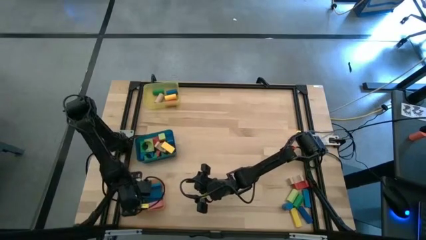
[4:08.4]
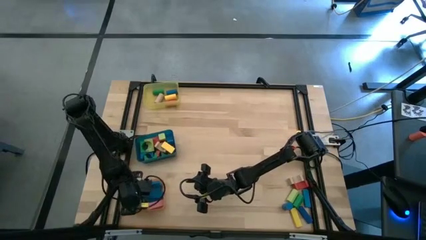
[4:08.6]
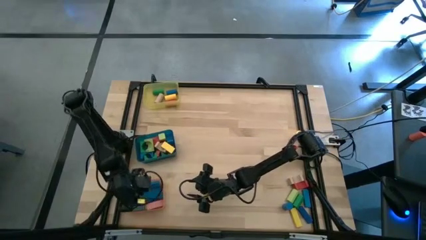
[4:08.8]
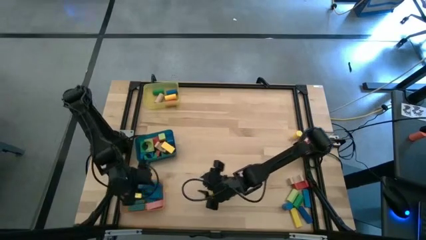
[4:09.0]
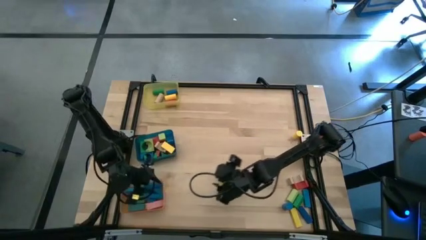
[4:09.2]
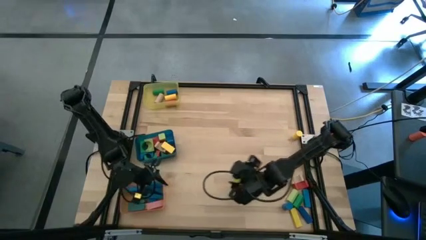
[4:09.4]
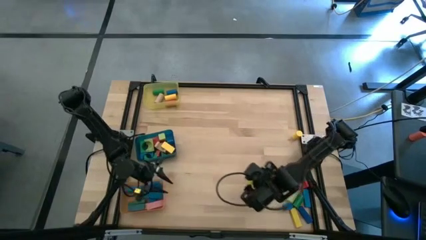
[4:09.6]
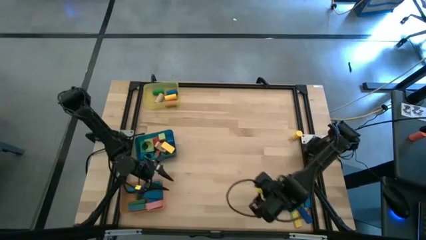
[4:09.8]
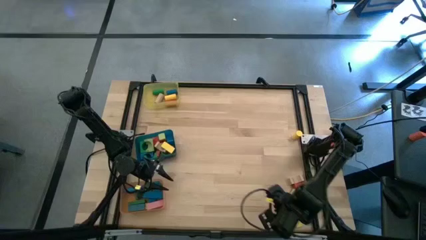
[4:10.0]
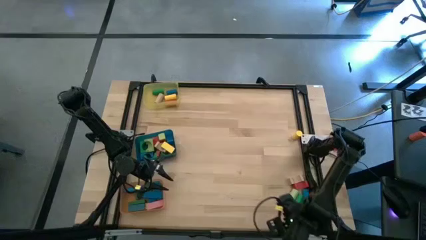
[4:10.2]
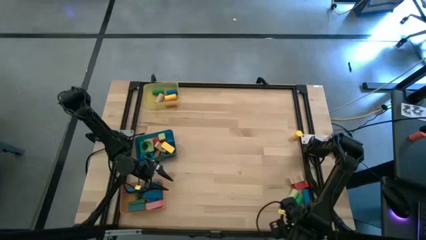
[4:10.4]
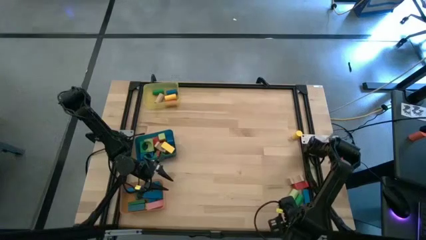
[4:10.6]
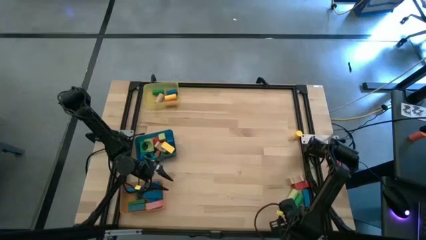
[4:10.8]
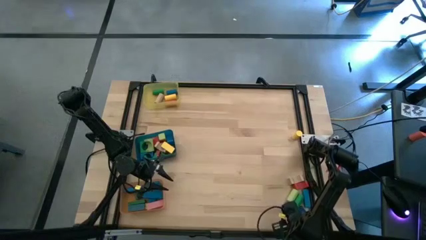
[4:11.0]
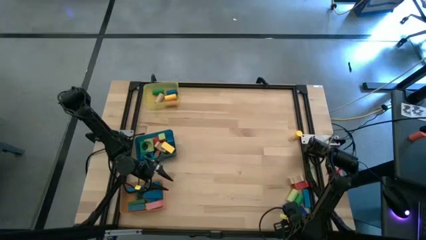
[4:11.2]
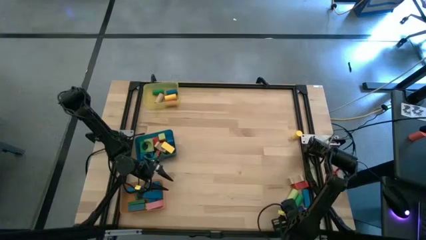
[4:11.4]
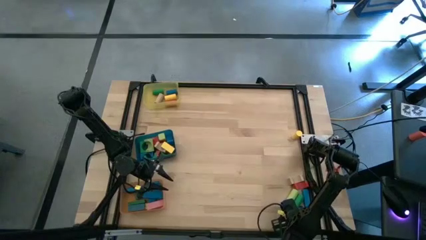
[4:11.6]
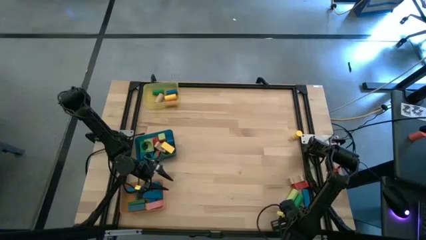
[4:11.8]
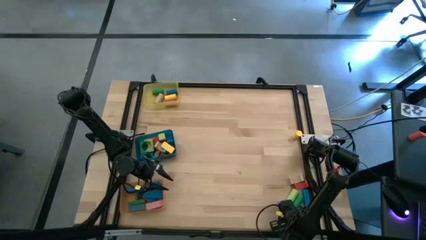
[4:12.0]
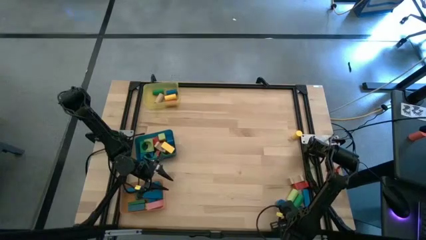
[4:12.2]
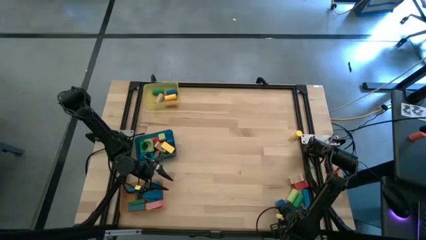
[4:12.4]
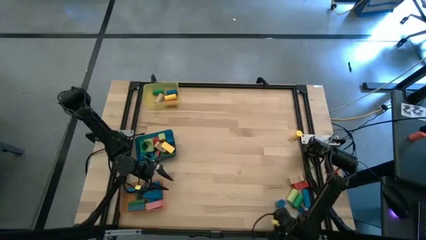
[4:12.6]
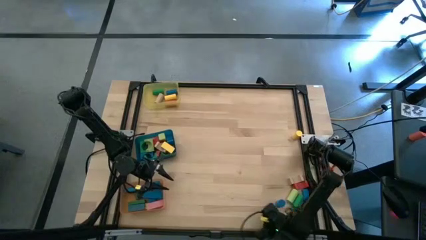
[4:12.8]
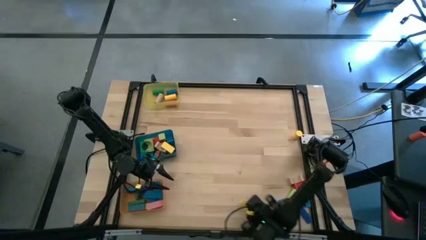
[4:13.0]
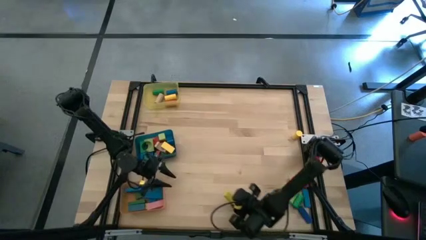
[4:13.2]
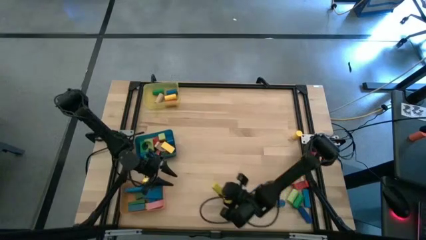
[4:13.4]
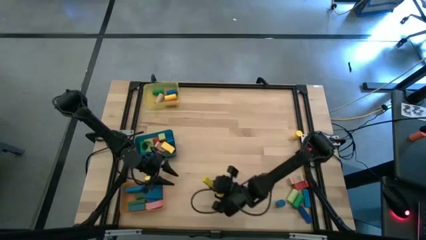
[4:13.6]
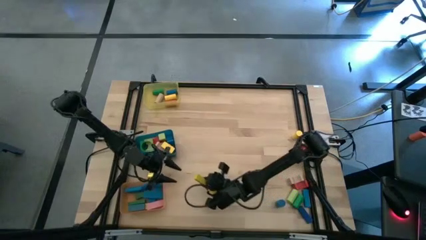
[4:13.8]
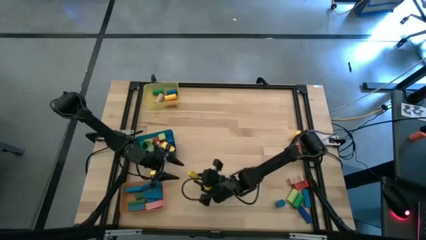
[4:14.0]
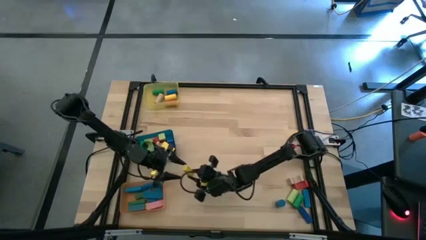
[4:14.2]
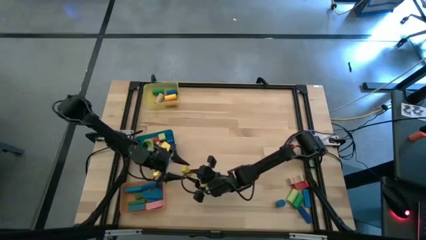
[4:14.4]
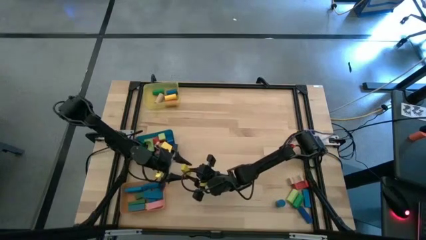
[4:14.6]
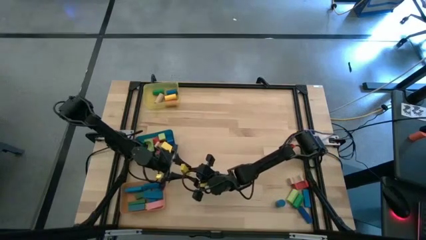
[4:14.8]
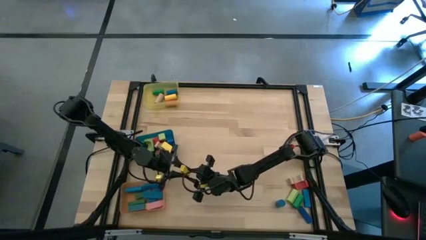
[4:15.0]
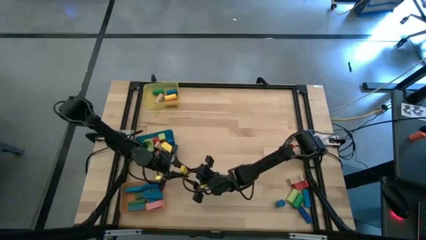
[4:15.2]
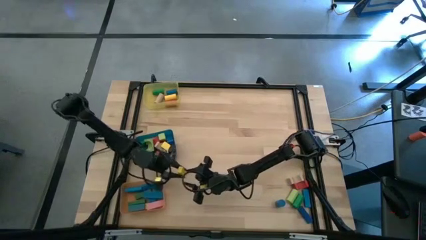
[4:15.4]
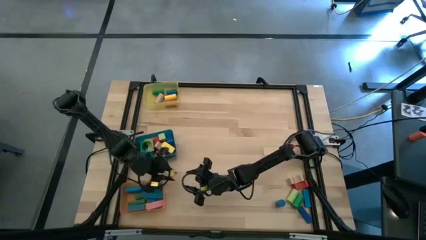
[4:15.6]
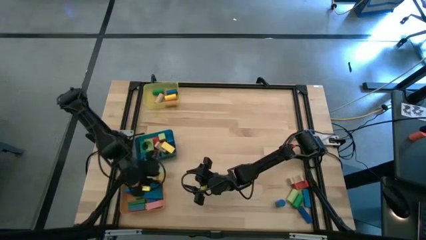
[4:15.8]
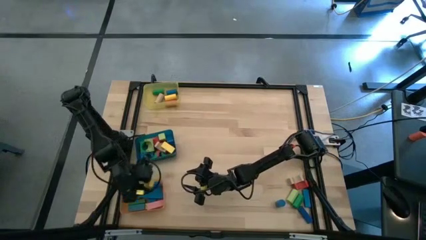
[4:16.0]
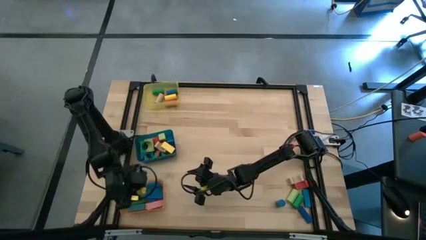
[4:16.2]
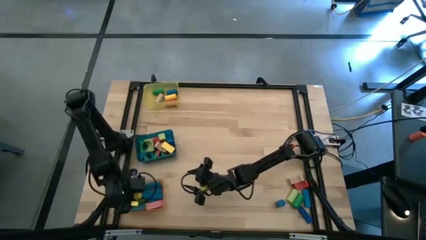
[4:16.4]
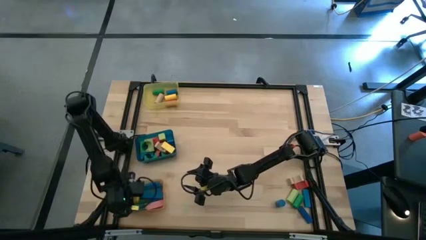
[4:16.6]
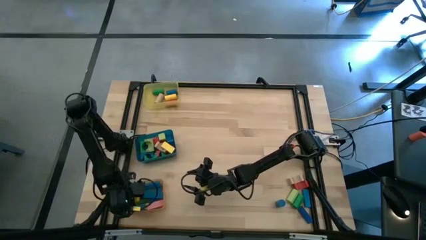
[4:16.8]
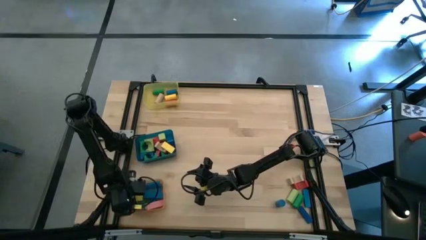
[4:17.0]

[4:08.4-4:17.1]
Task: Sort blocks by size
Put the yellow block into the orange bin

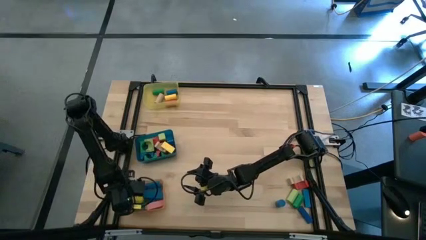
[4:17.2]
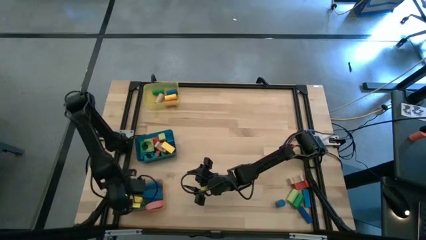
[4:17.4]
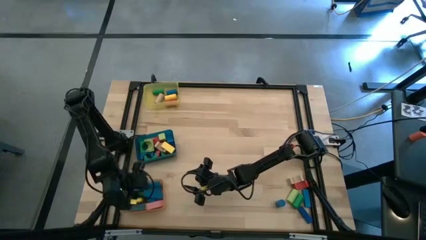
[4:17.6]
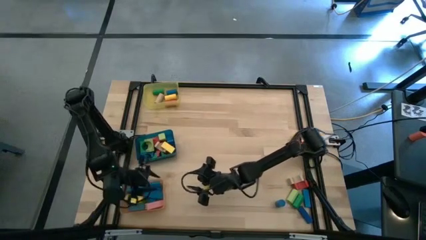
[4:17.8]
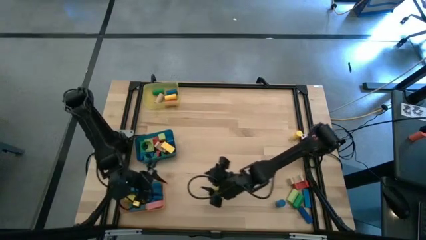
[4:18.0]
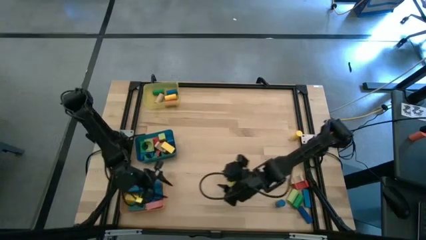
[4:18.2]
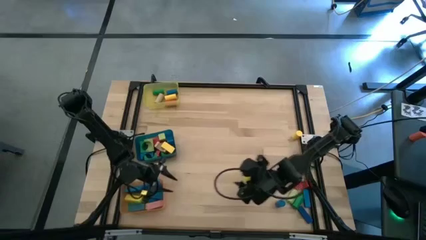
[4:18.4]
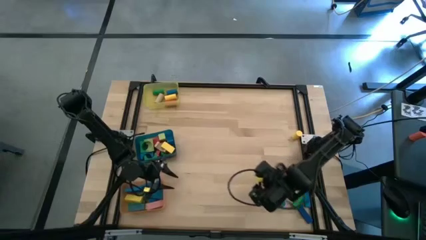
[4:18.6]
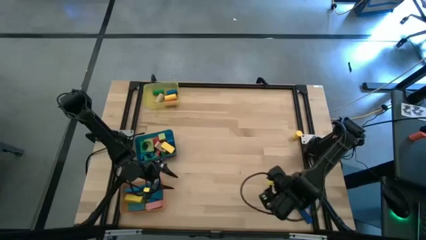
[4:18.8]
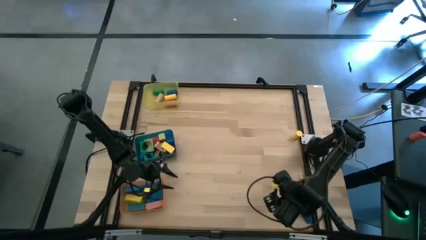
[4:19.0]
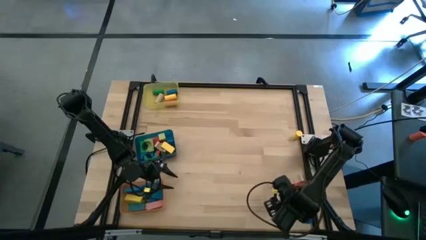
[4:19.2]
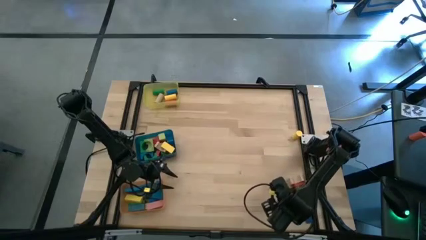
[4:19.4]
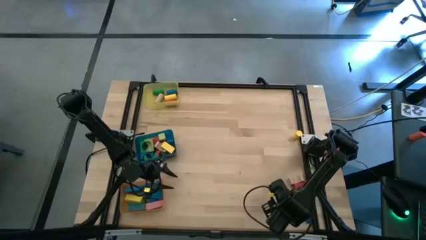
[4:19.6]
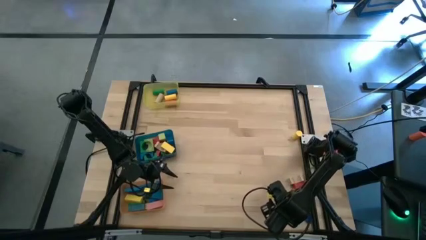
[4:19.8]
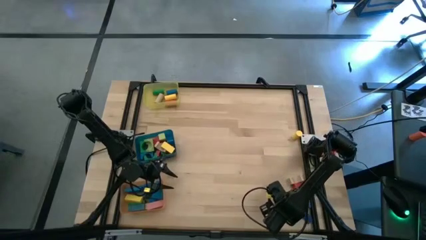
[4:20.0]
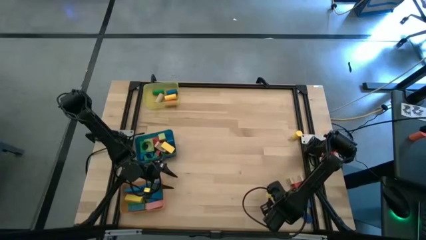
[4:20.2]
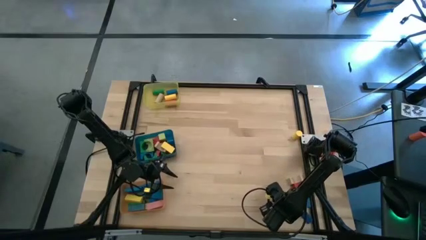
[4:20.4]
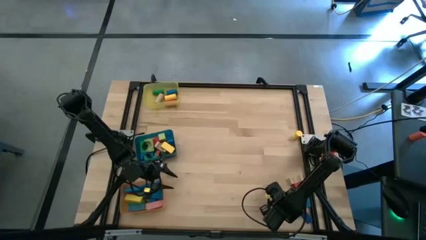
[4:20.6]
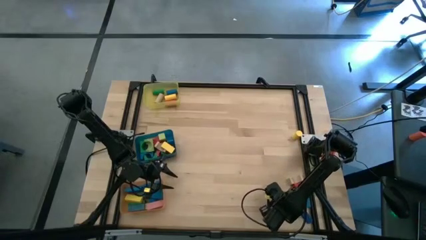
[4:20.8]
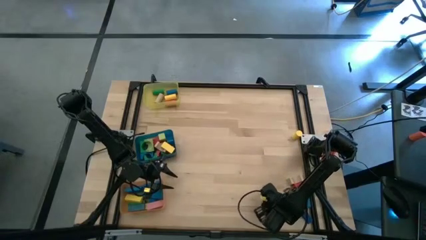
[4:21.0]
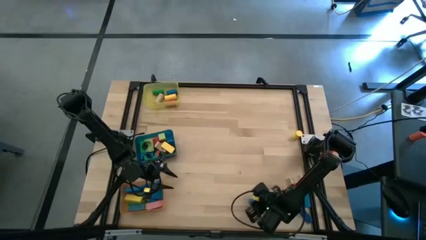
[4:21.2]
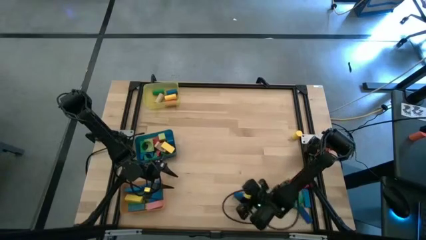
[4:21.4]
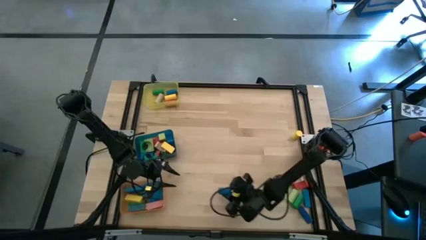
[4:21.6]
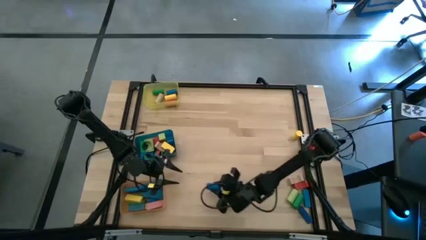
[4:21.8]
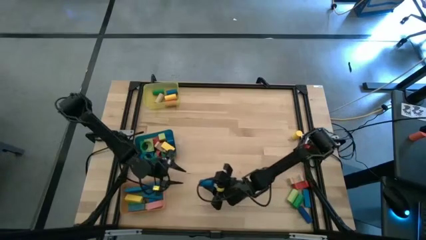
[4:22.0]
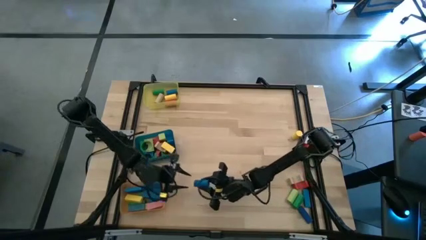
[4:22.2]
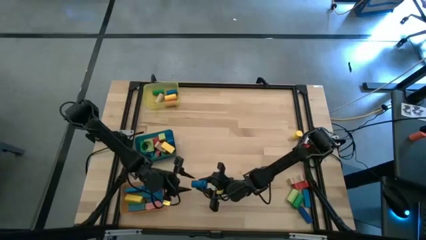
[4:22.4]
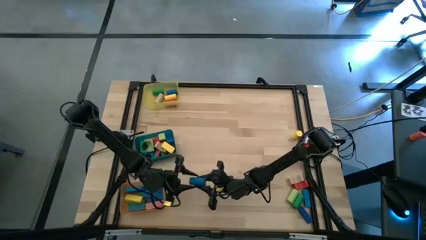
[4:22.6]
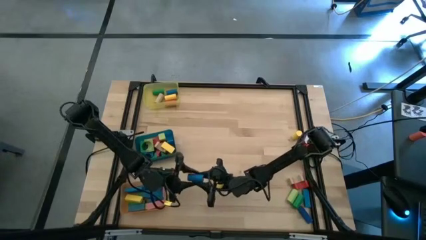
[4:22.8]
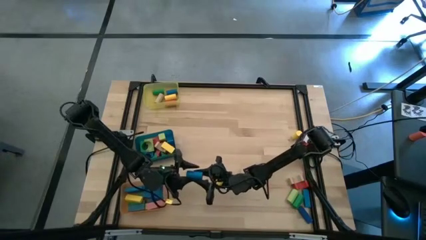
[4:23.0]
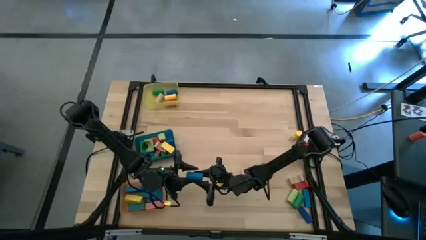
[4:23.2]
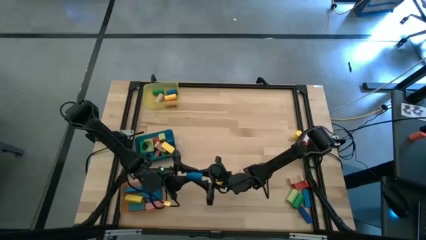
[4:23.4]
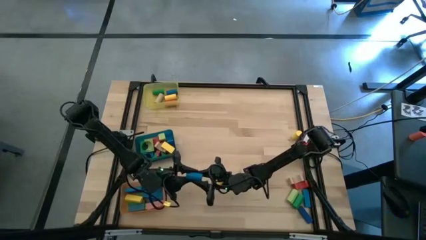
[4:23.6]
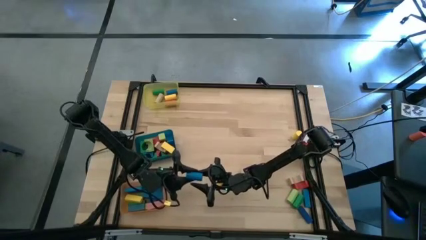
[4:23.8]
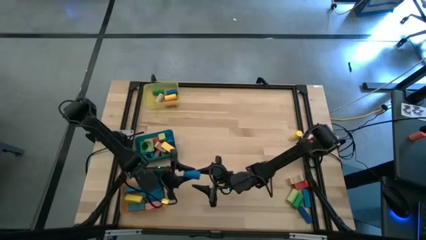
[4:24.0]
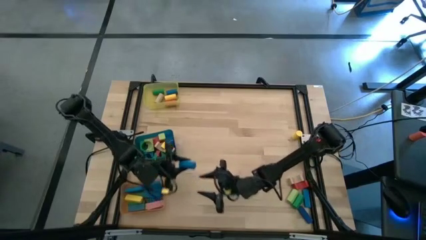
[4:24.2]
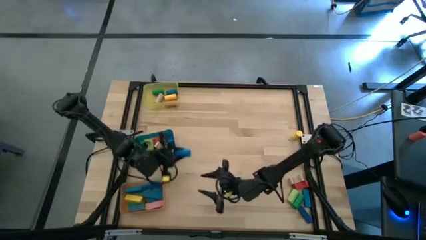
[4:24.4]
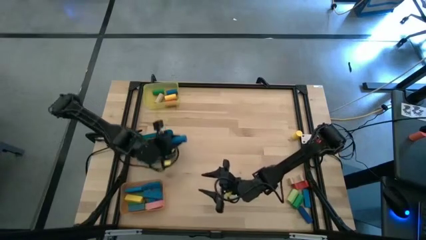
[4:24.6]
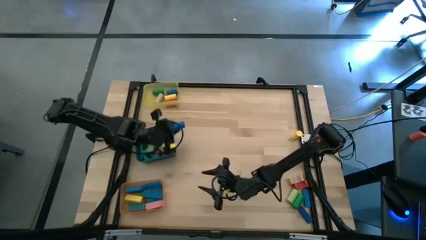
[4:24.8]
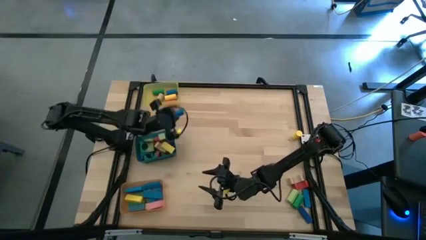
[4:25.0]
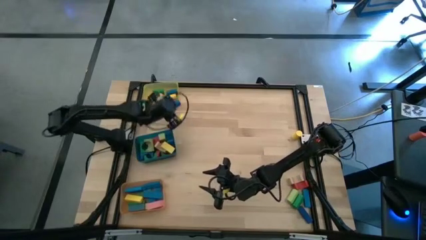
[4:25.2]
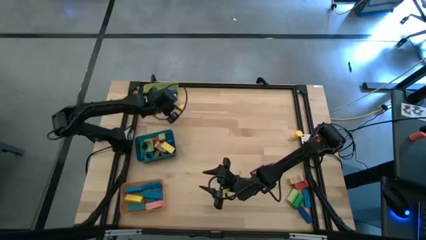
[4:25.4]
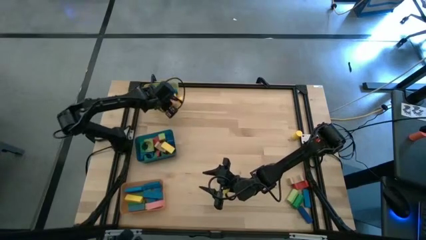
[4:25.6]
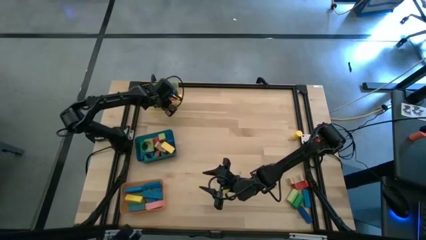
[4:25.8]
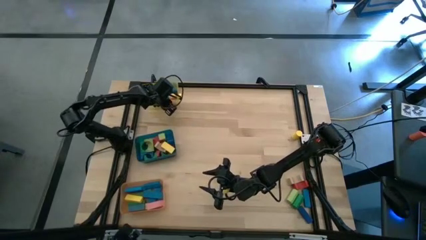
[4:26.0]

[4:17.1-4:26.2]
Put the blue cylindrical block into the yellow bin
